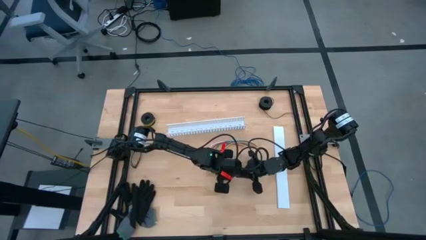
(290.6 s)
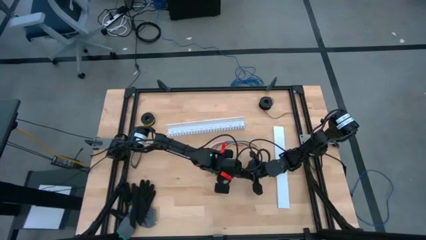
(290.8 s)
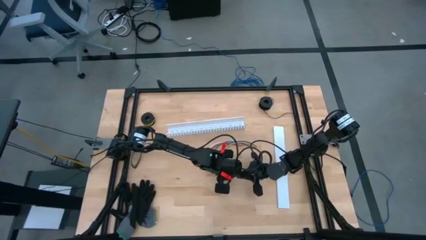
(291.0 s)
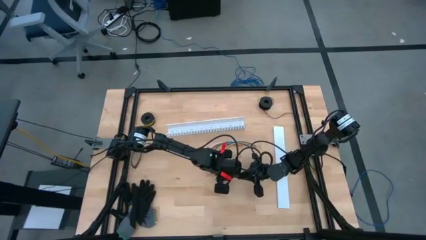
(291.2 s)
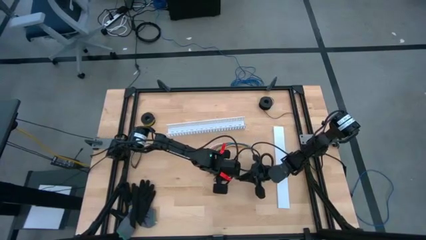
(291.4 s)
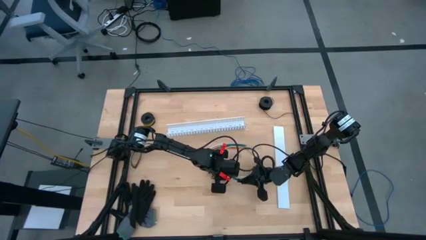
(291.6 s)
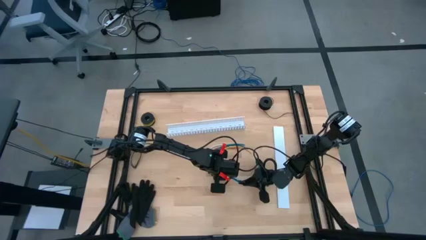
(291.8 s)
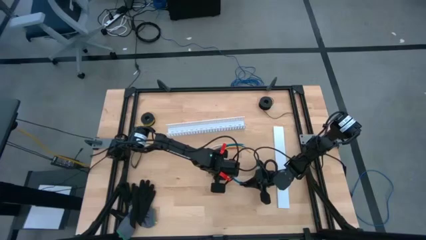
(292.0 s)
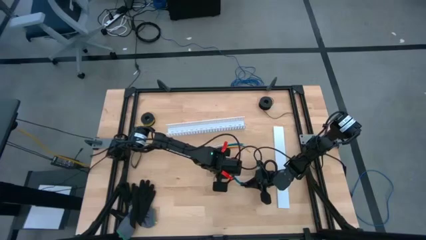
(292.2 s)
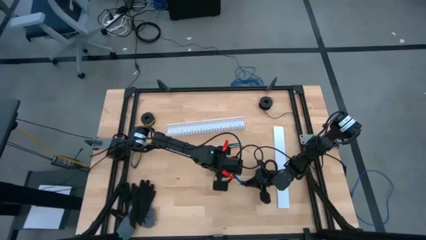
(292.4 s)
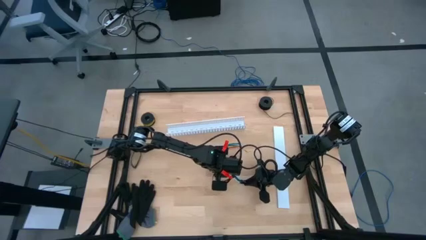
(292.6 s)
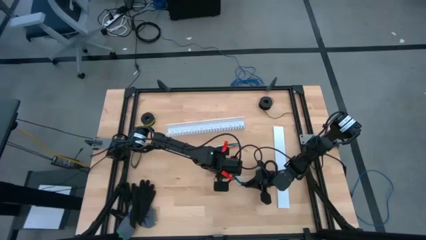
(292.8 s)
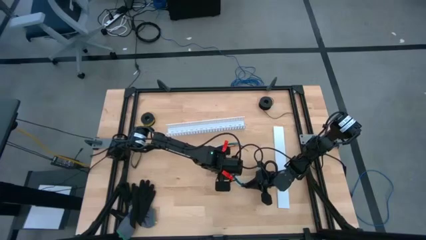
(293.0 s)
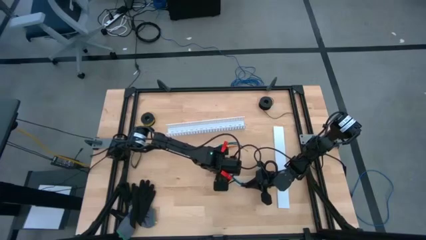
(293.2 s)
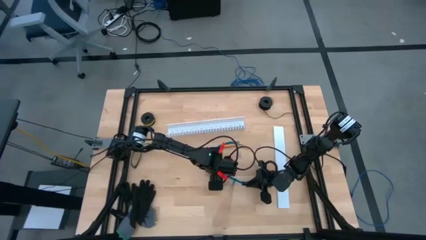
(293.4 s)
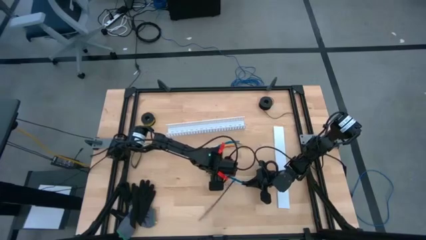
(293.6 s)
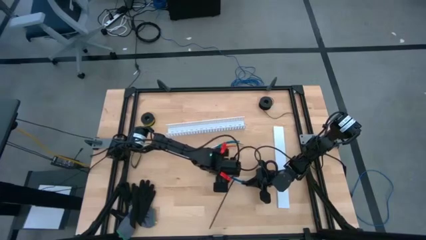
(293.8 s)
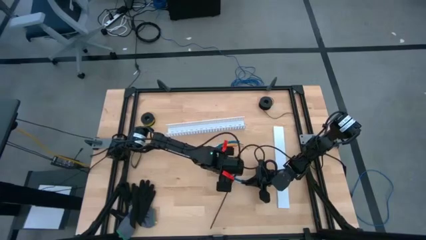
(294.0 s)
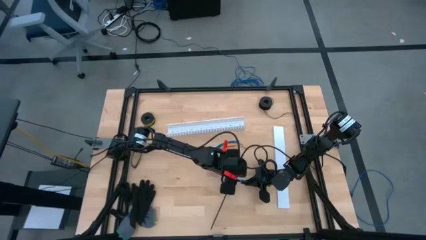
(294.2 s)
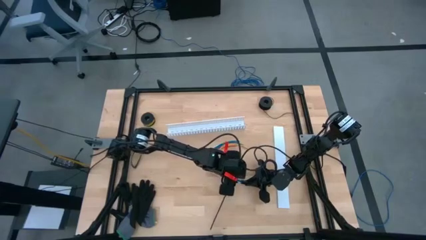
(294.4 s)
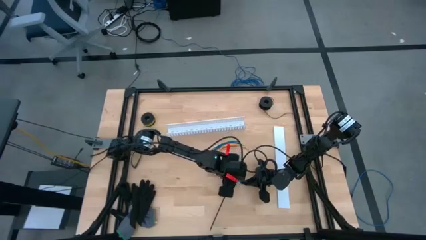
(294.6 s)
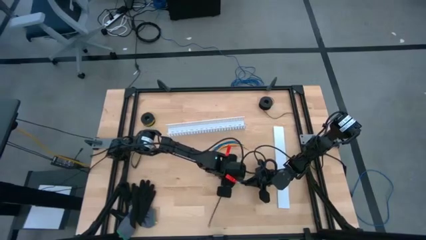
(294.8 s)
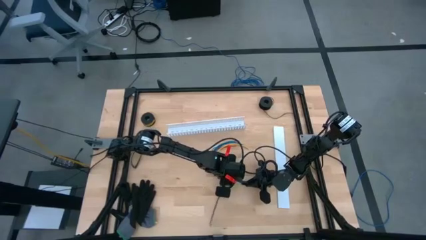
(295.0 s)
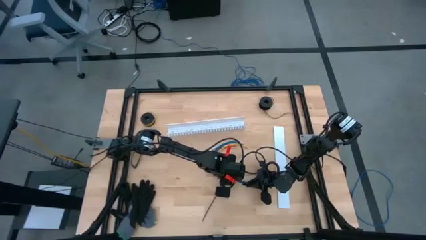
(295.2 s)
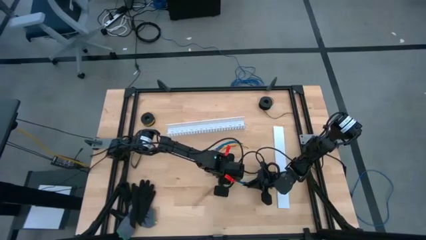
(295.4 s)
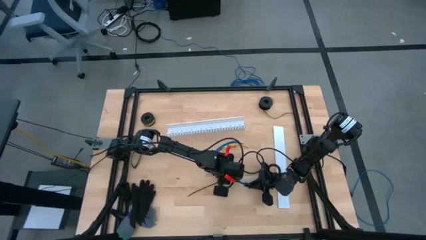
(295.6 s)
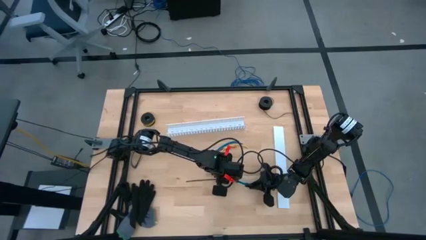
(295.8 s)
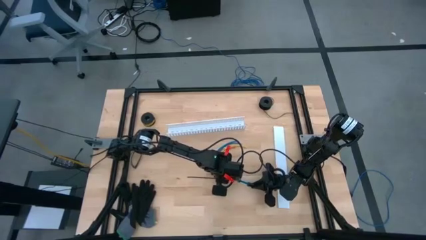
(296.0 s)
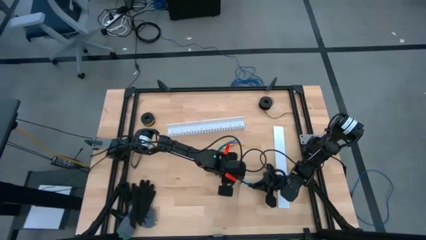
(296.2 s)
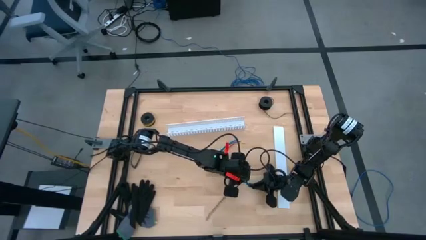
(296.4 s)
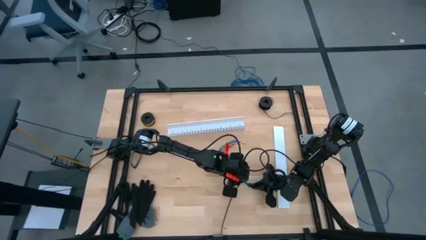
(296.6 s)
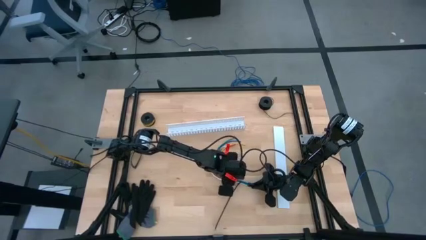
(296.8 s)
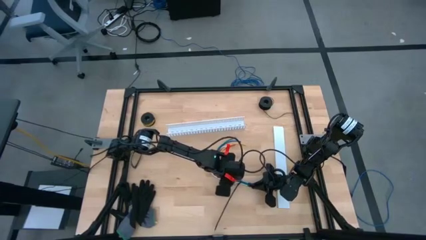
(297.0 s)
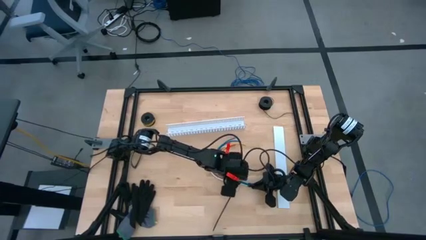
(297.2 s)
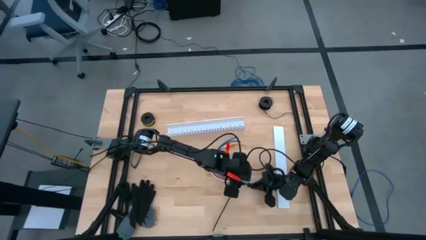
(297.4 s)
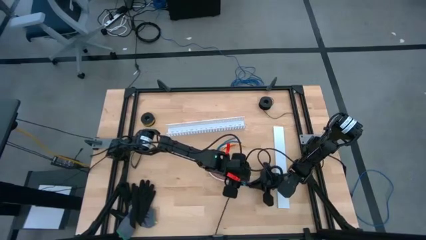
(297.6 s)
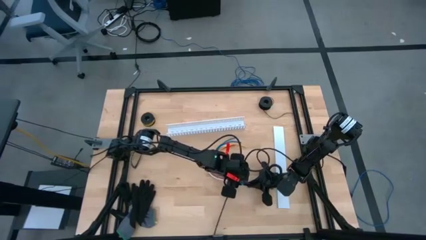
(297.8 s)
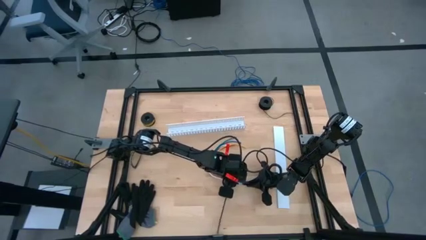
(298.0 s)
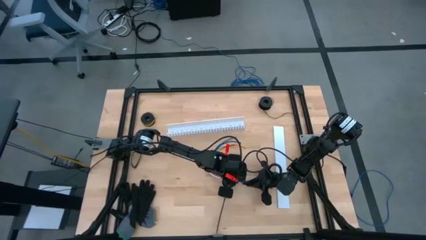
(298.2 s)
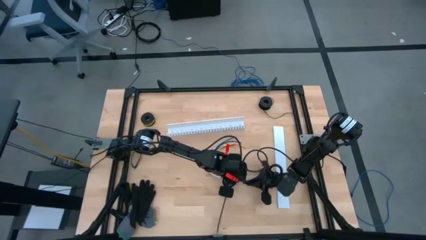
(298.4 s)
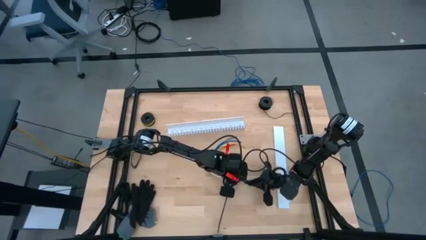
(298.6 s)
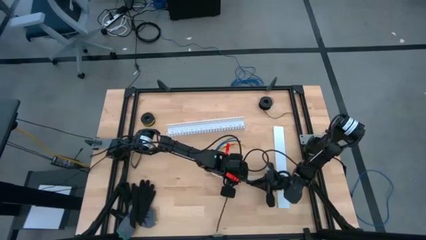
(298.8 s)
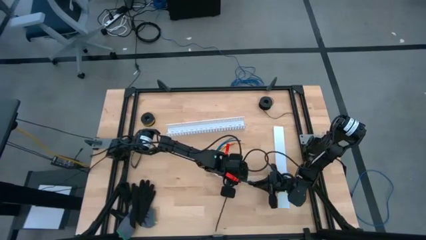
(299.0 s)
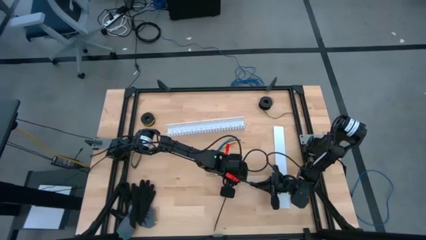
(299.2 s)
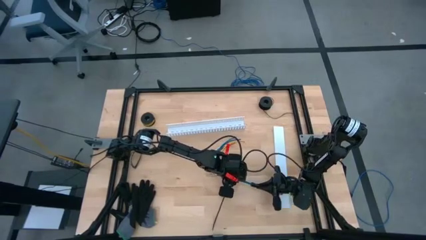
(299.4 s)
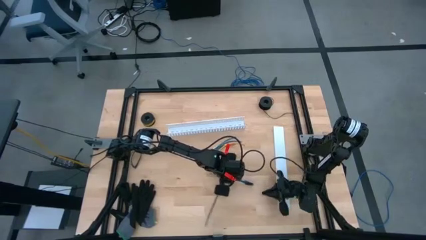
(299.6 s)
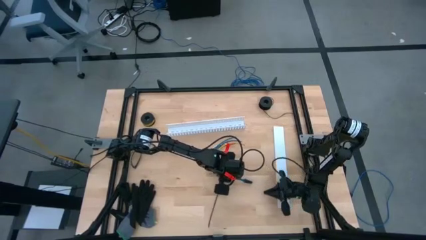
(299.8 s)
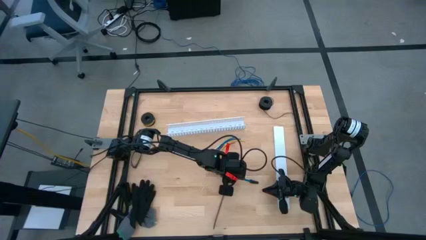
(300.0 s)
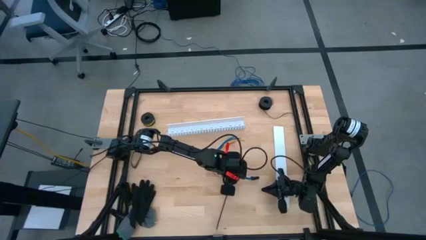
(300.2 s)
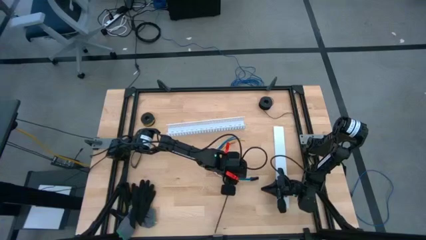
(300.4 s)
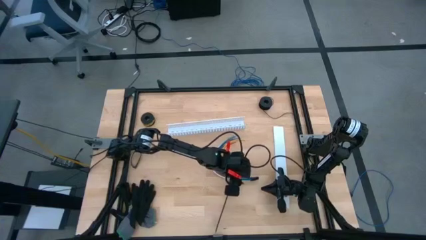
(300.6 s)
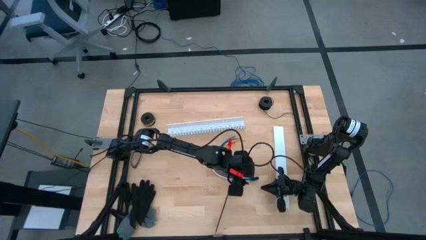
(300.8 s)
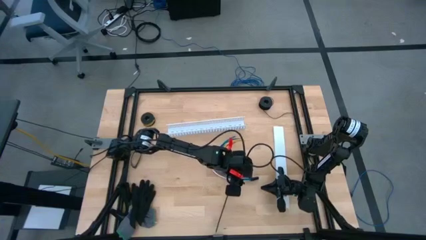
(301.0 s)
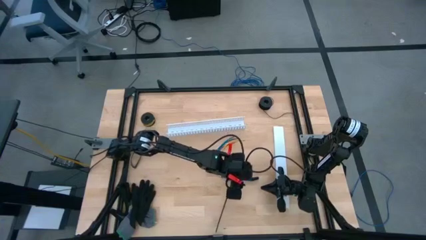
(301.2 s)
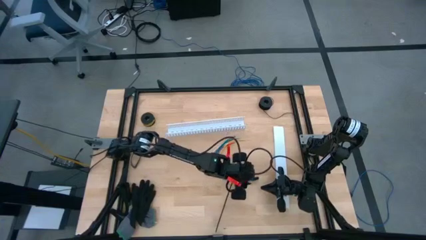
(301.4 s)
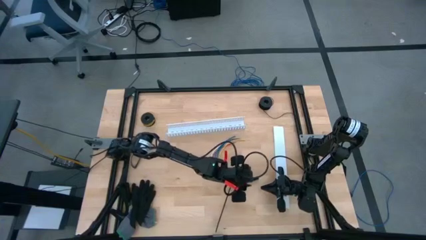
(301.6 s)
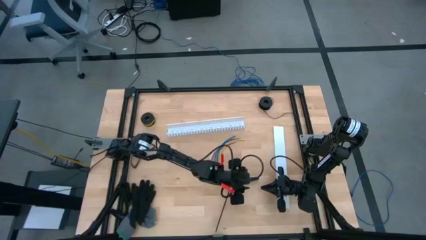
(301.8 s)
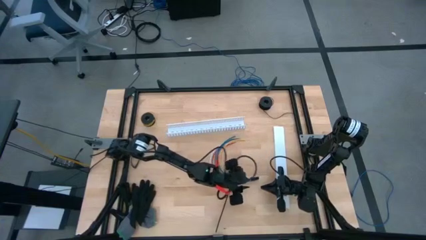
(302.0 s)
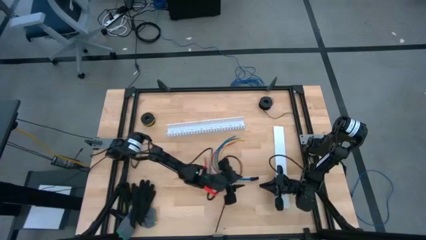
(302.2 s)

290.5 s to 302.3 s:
Task: Ziptie cables
Insert black zip tie on the cable wire
